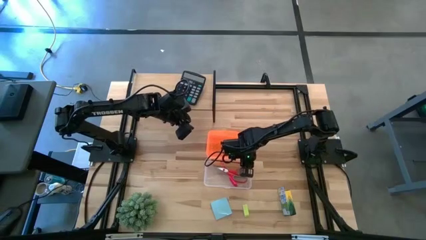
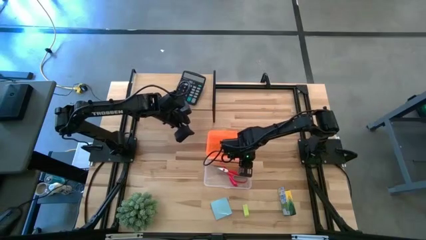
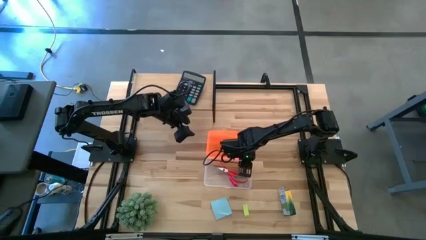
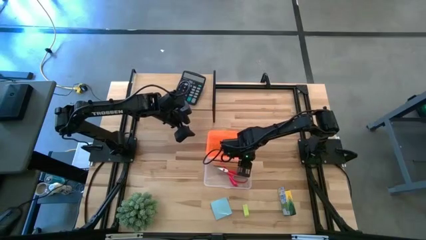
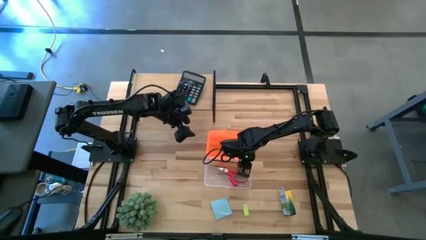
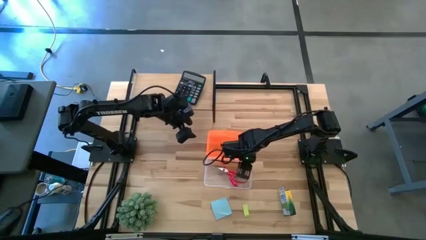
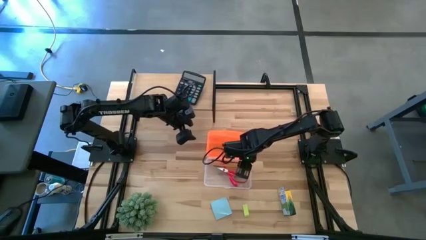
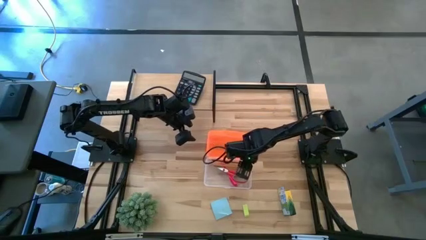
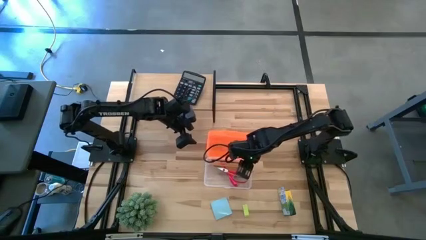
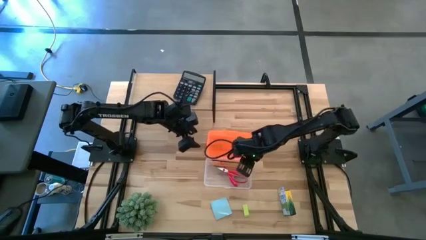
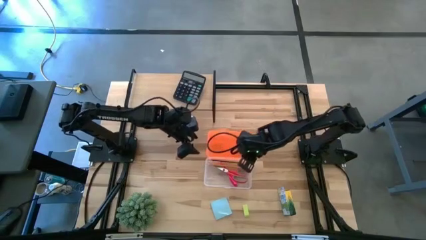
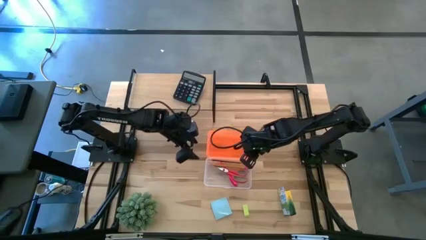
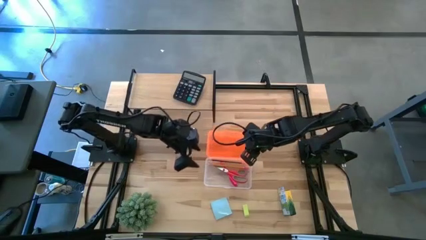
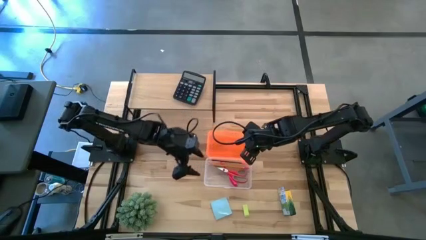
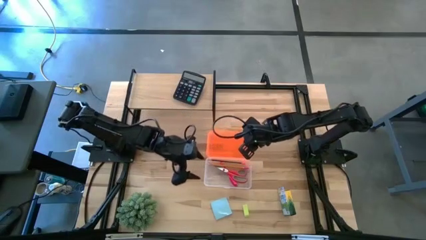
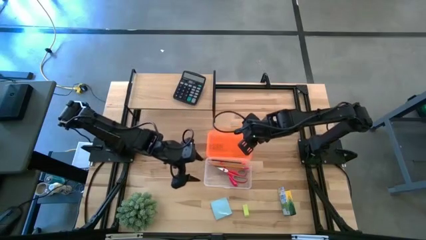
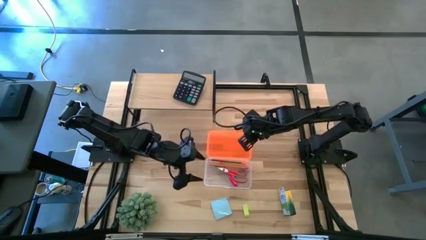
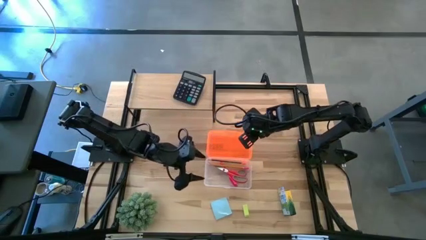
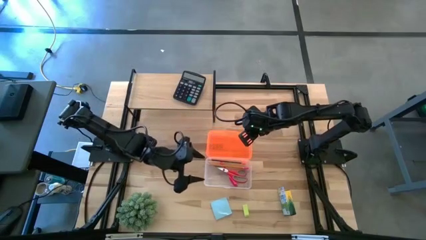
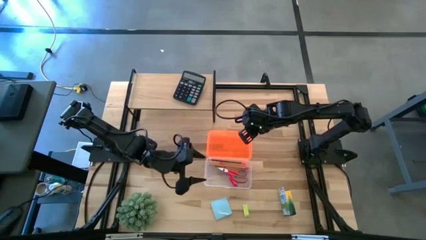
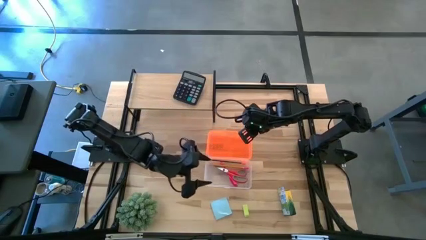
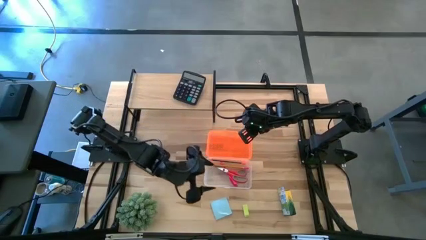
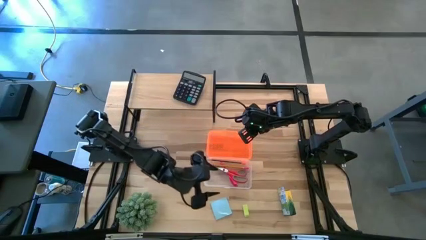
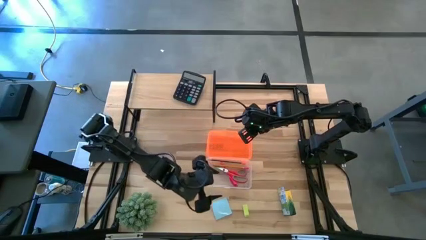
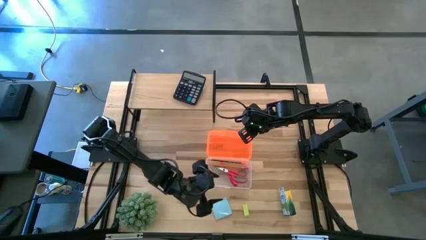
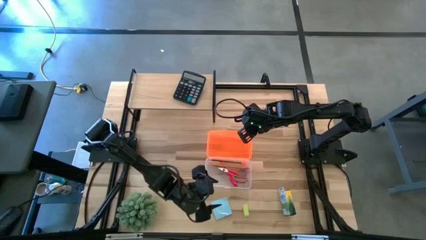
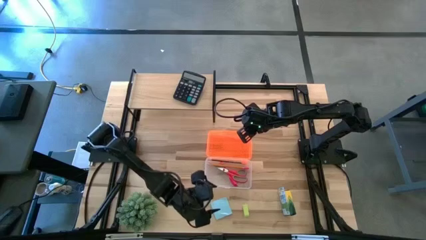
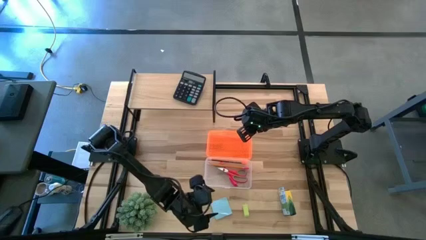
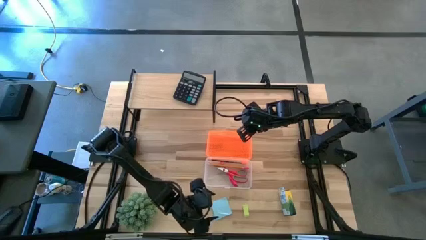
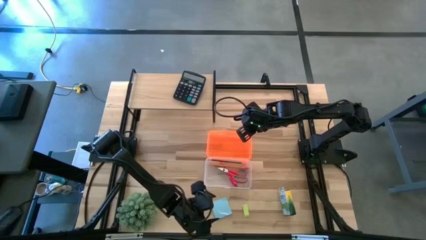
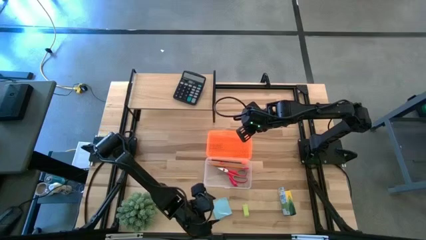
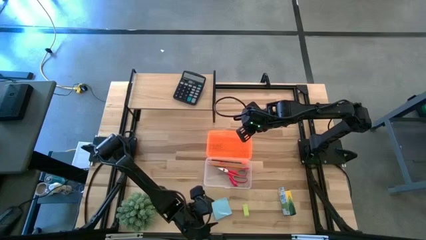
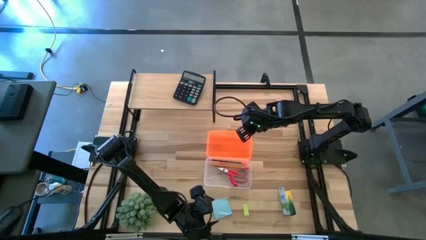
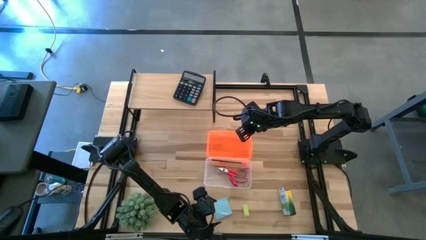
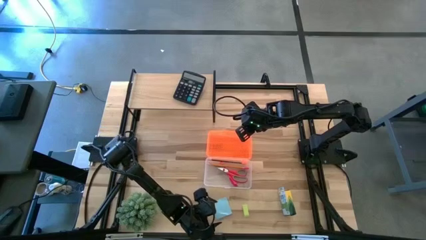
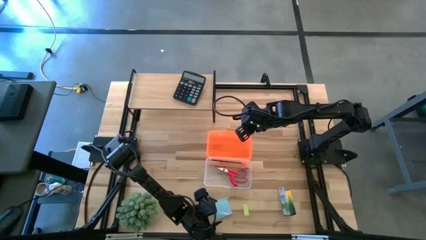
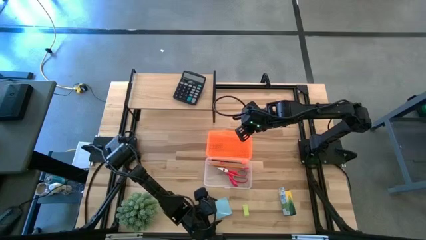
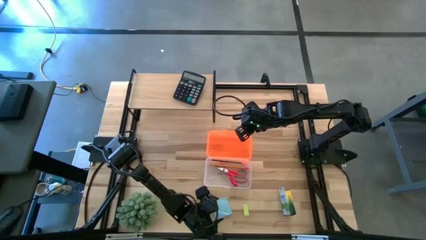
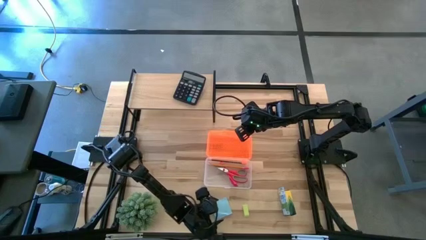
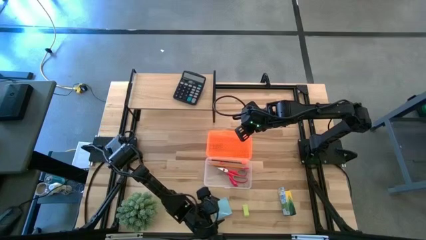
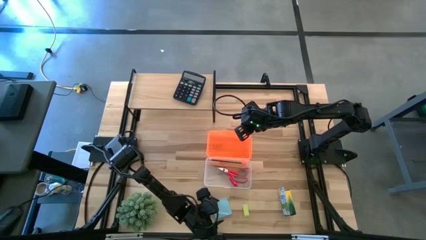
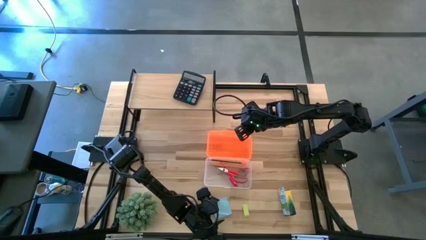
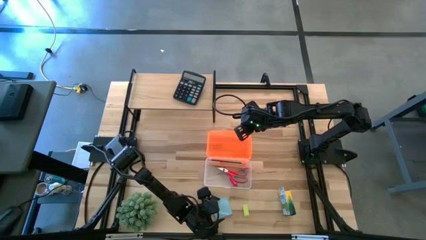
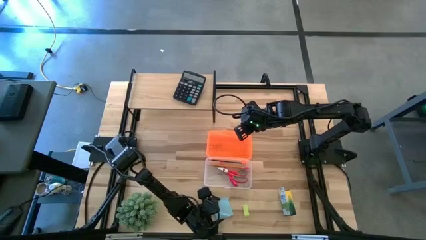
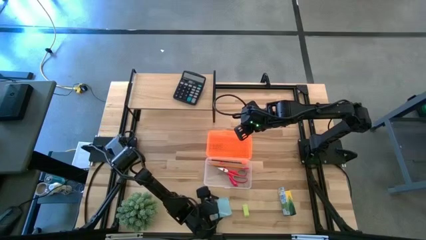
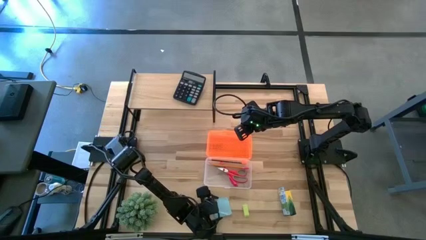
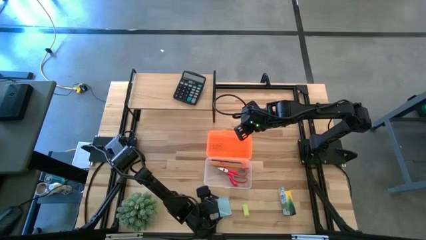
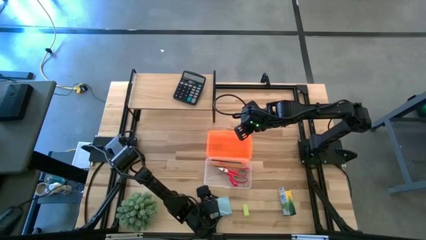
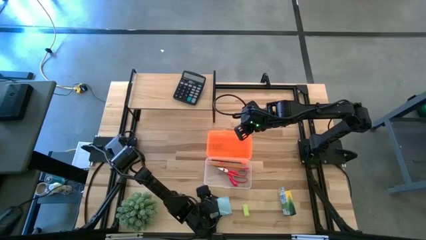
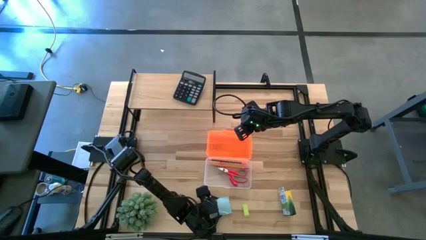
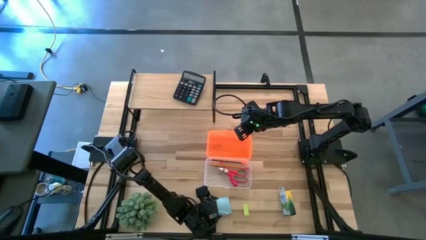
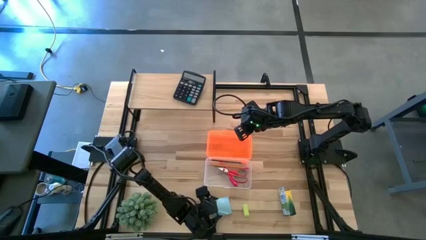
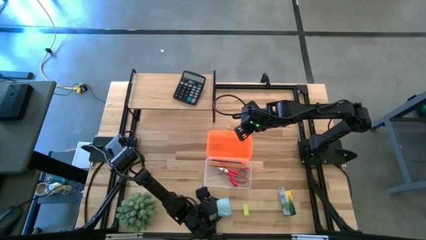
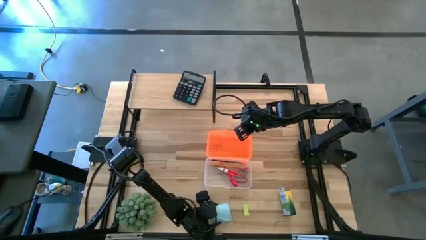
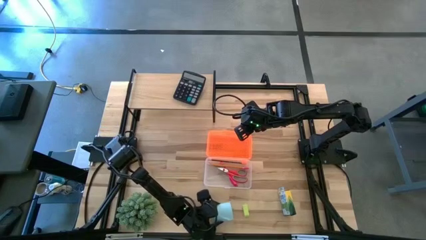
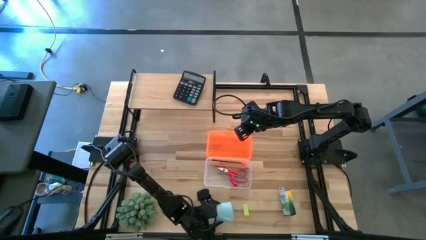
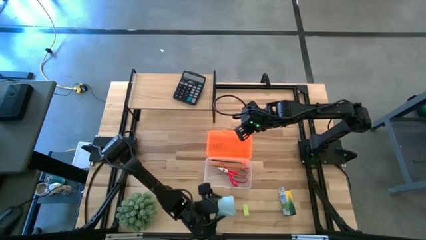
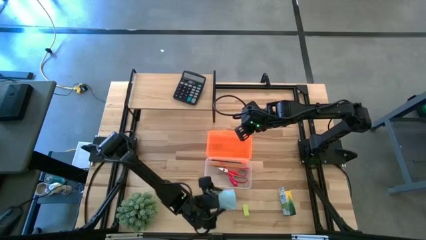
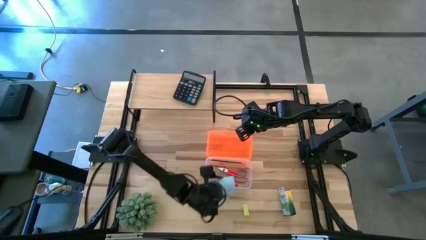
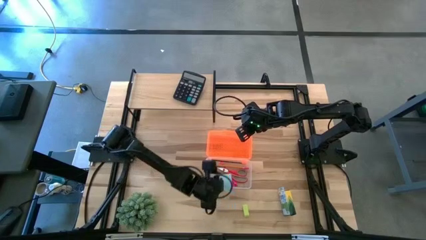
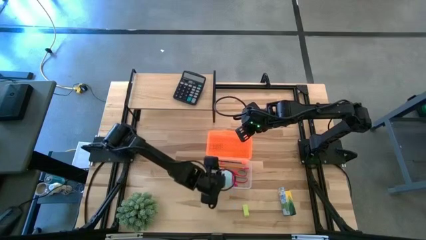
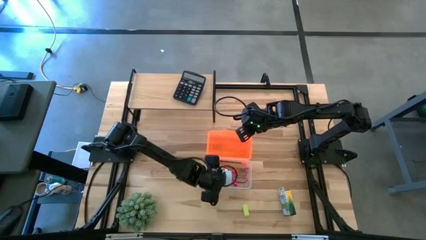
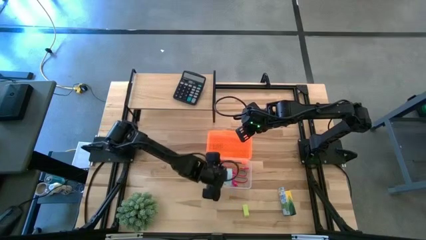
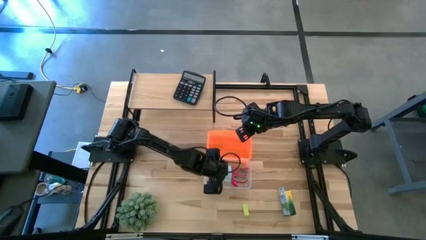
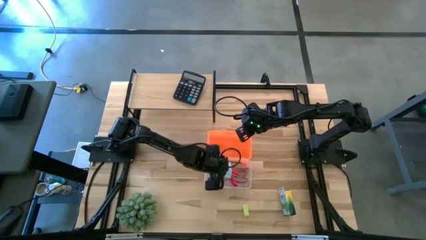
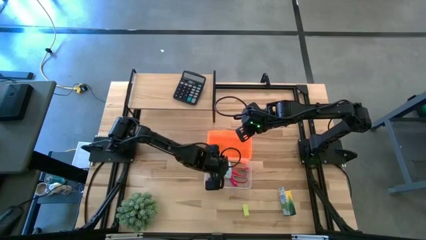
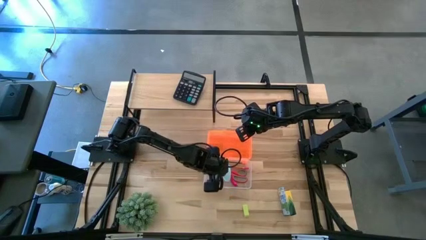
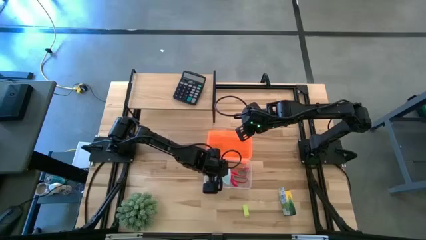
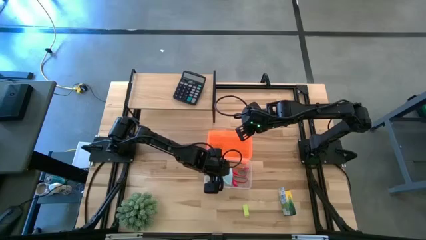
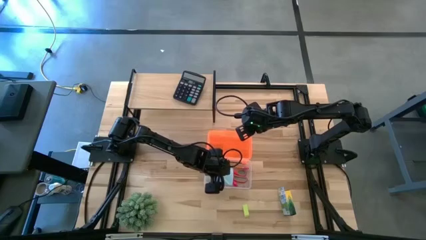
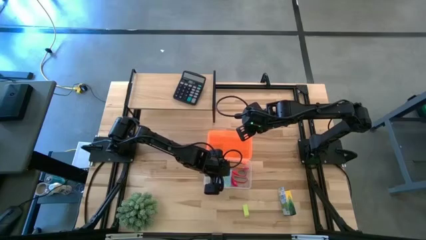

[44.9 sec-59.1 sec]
Task: Pack school essentials
Put the sticky note into the supply box
